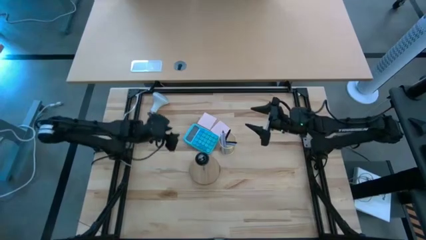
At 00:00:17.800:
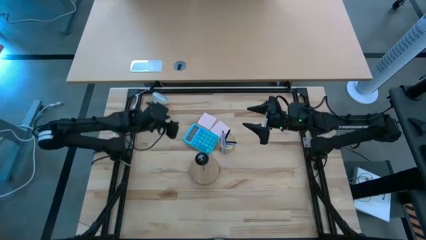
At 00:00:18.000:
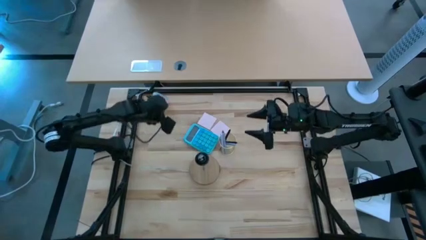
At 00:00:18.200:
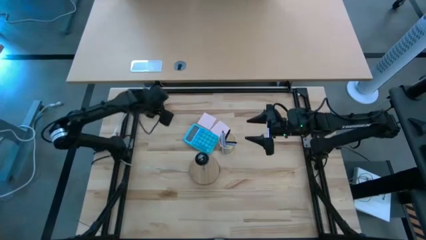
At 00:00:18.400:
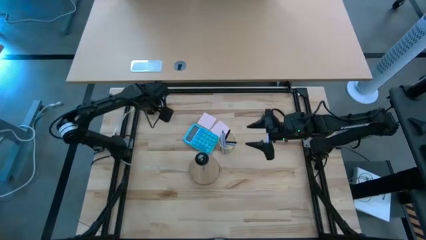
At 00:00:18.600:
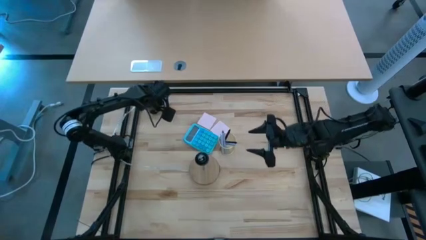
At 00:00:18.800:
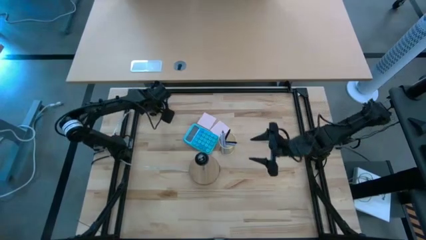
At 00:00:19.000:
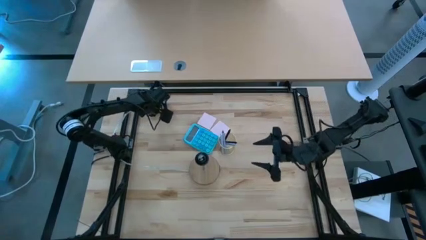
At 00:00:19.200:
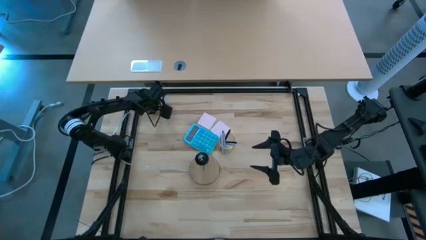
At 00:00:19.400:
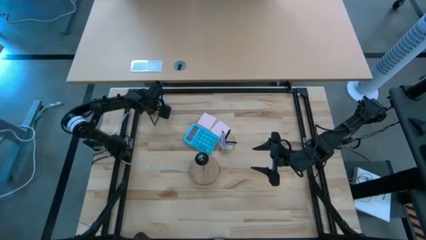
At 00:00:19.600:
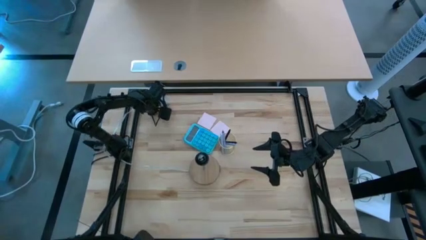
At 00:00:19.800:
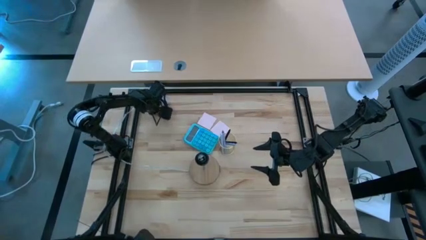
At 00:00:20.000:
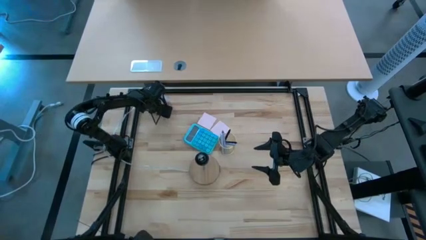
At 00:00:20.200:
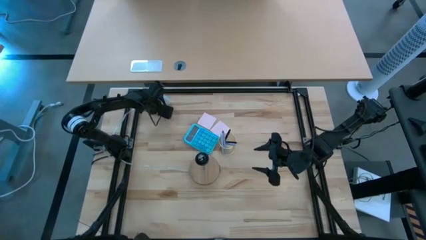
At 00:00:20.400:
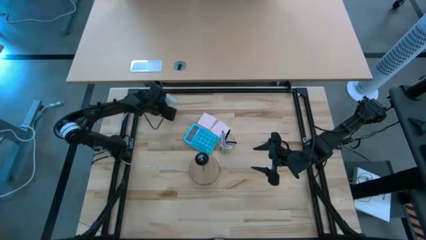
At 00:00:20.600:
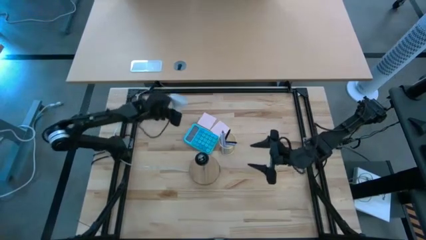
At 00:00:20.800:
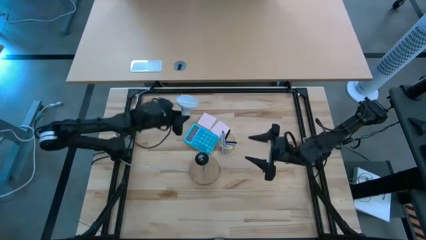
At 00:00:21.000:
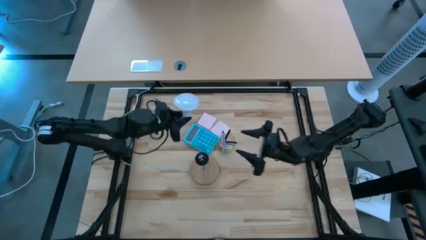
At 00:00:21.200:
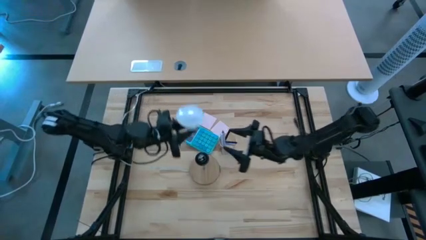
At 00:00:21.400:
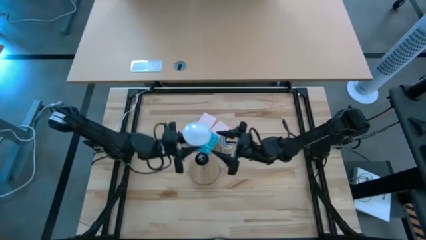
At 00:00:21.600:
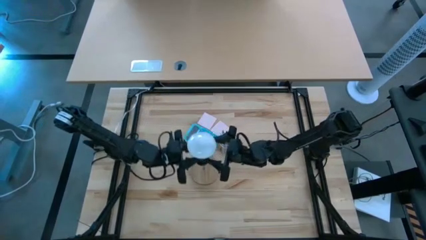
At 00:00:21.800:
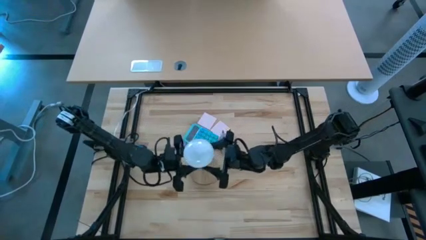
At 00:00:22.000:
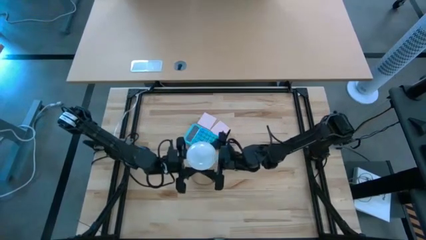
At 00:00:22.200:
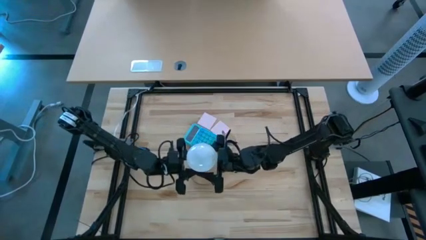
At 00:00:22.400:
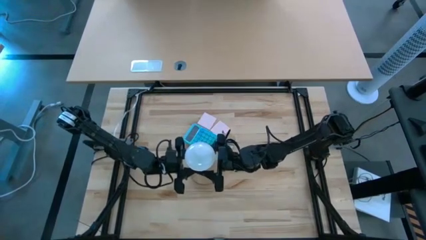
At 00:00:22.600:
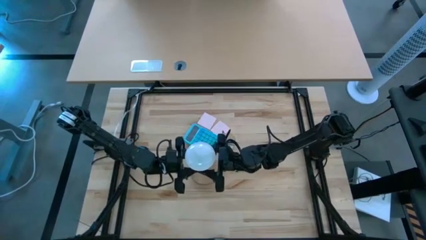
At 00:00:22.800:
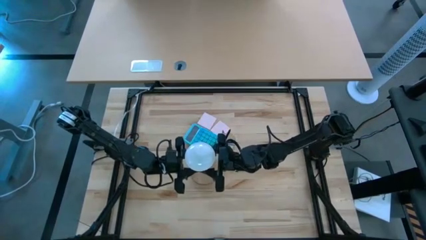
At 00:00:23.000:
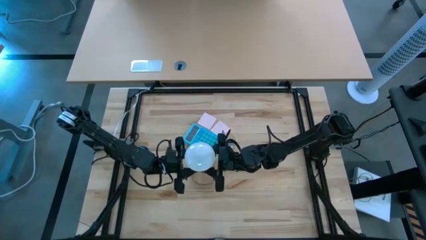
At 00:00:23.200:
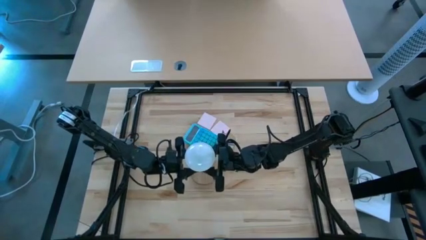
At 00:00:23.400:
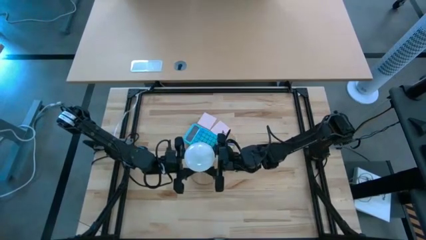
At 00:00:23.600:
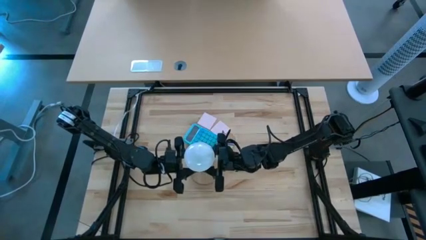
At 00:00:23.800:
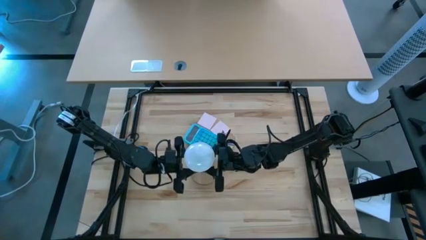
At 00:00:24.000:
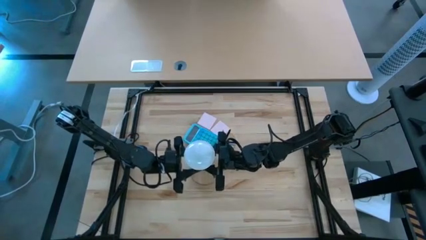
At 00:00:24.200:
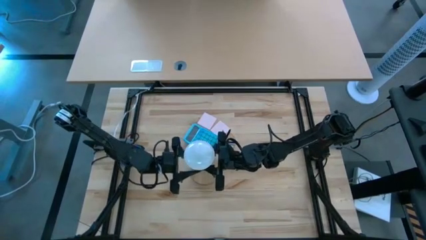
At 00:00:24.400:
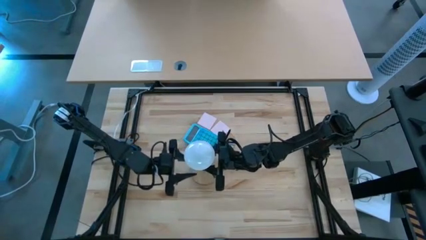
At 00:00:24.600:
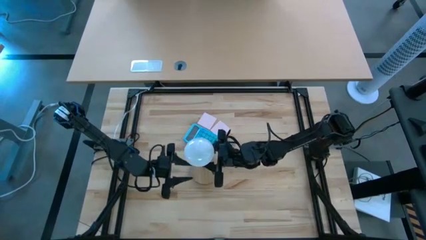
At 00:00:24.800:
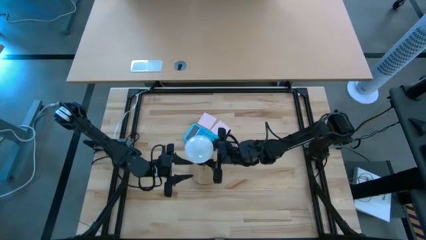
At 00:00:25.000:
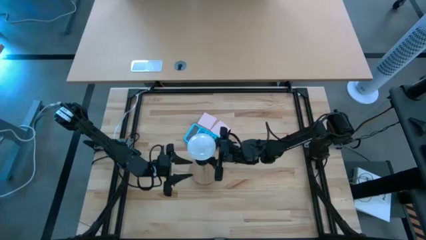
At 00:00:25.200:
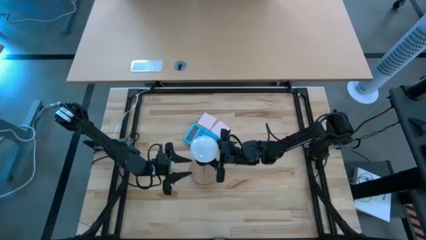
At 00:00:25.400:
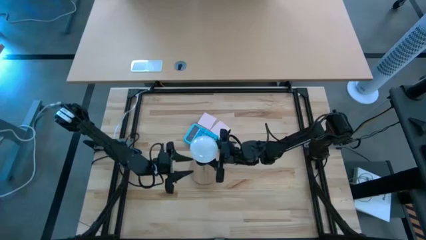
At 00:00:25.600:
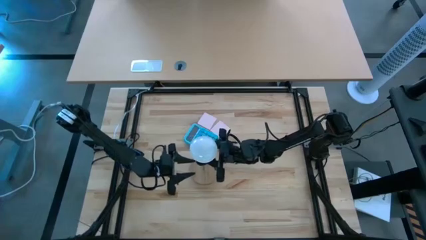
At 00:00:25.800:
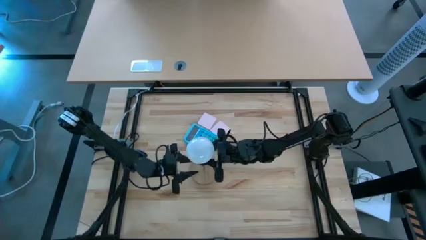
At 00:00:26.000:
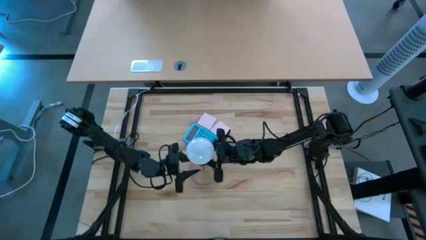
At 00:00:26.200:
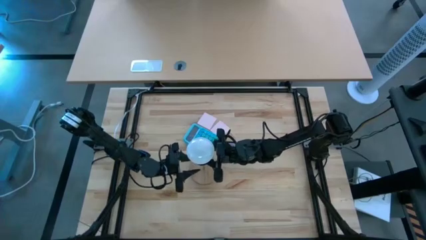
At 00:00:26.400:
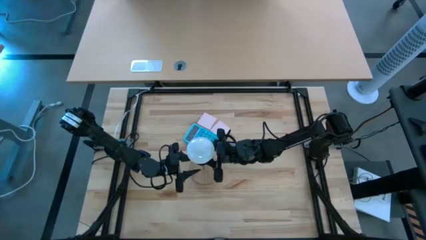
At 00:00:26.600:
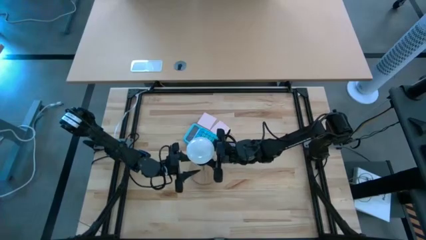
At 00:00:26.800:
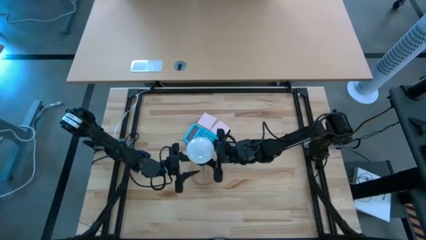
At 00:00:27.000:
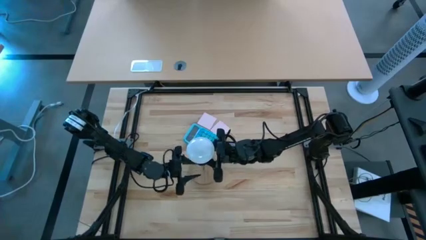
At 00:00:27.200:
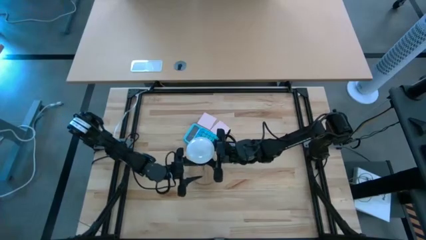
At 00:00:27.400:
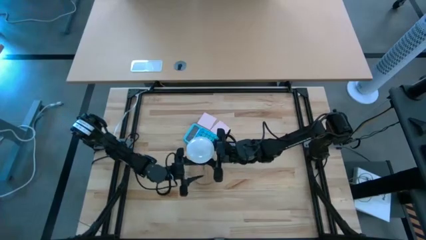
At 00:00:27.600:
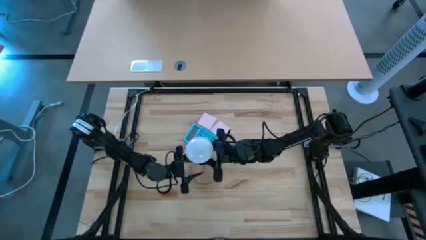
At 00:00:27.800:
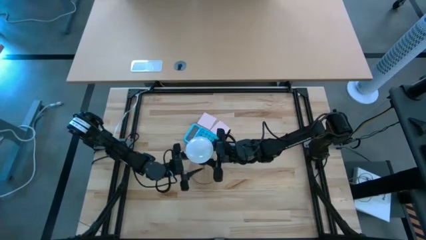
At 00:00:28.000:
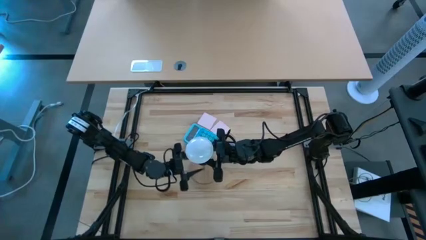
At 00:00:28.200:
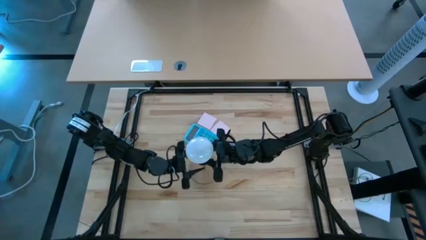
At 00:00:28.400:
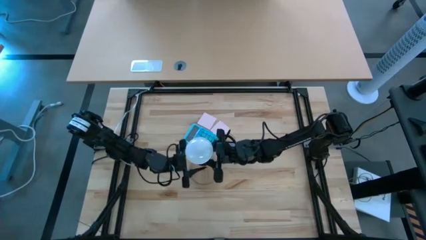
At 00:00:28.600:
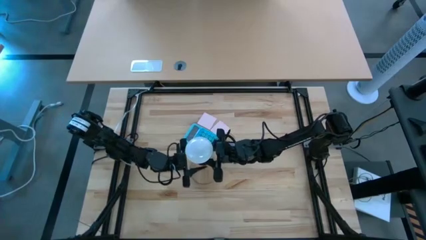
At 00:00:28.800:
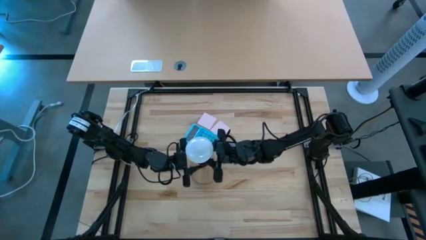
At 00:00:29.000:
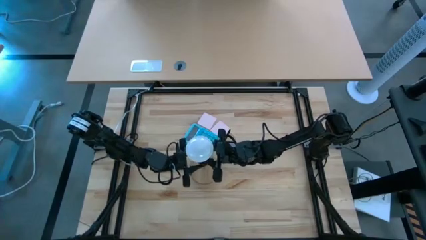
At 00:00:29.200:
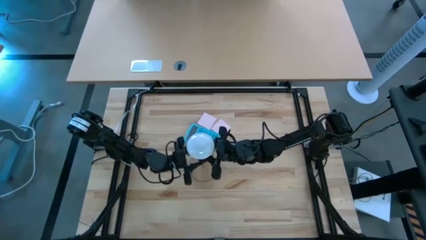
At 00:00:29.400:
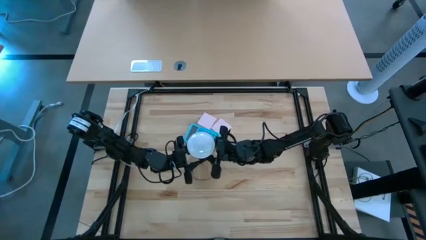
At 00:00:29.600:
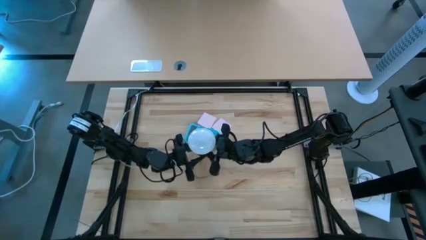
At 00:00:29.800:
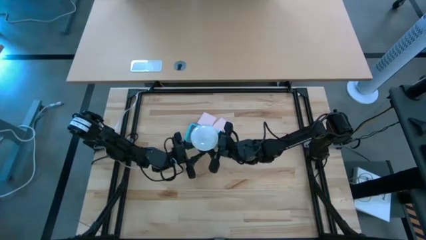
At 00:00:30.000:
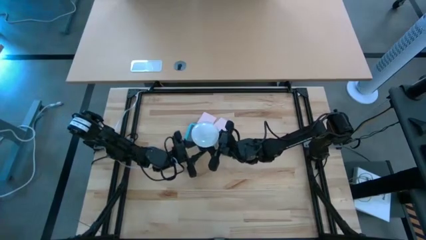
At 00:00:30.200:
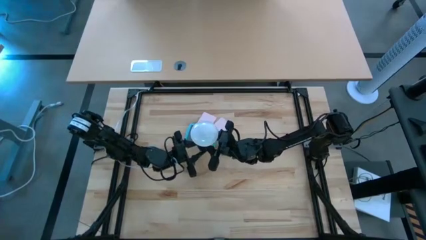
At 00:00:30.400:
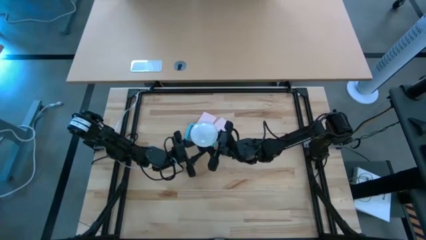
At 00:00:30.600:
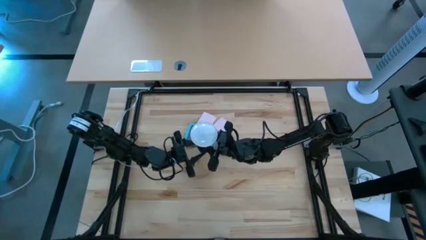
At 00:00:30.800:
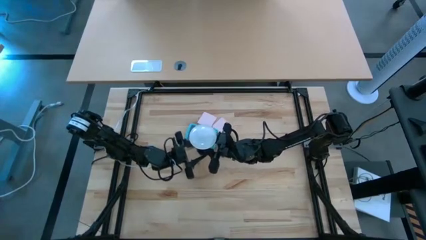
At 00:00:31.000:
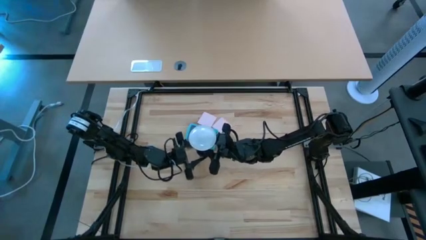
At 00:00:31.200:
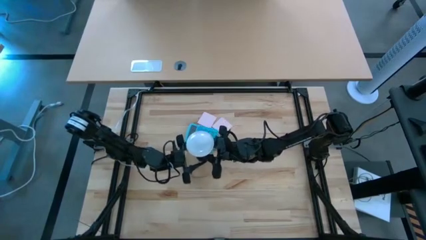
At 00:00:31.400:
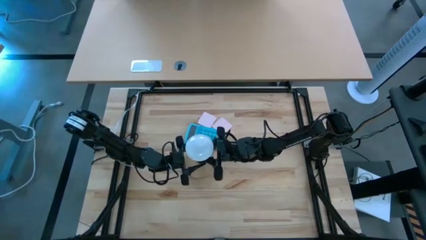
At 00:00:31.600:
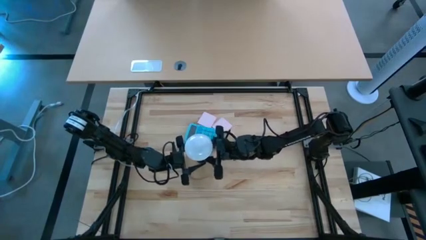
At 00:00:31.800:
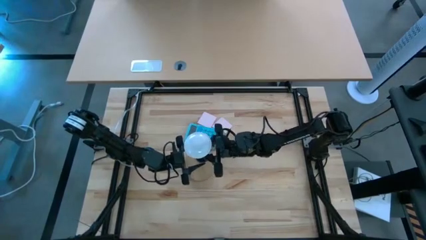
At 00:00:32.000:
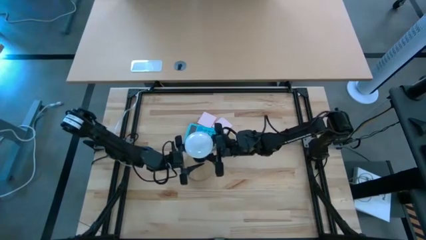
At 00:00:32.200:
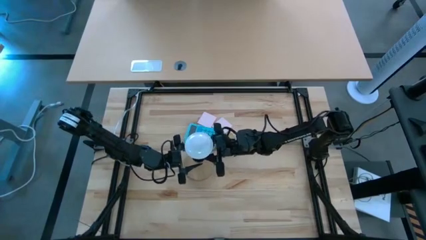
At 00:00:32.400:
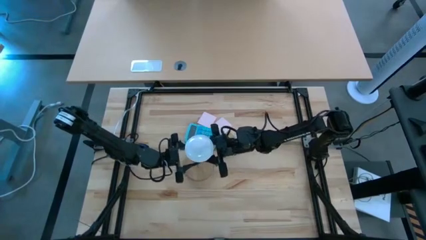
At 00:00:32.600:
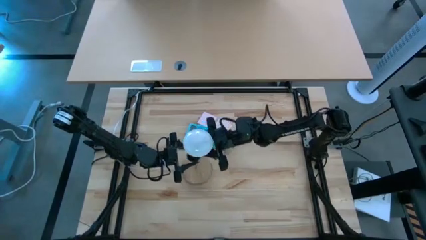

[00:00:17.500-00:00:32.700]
Task: Screw lightbulb
Insert the lightbulb into the black table lamp
